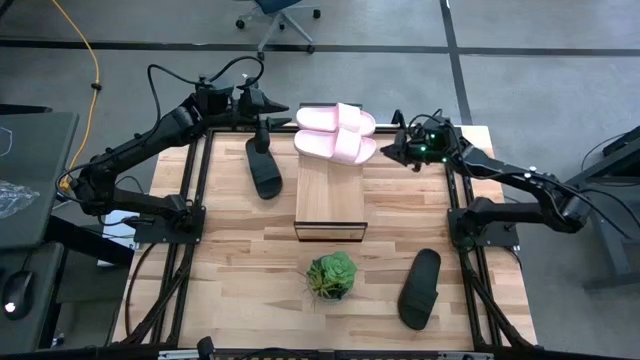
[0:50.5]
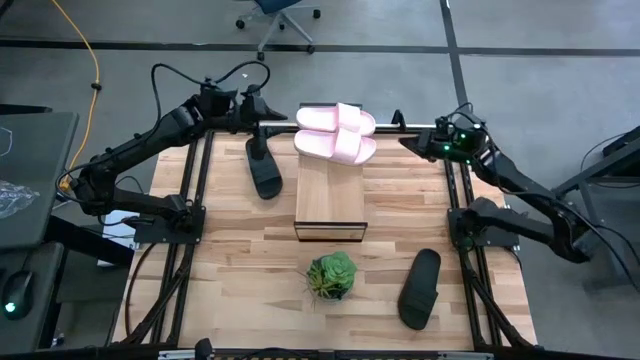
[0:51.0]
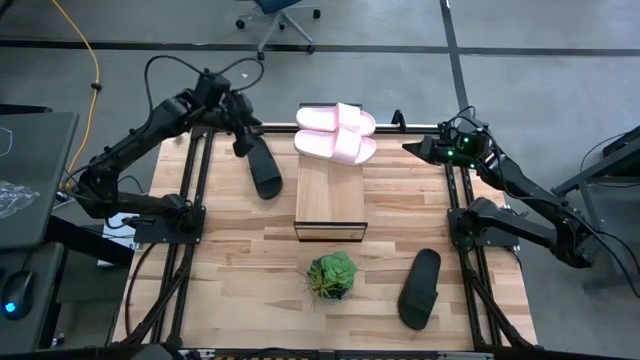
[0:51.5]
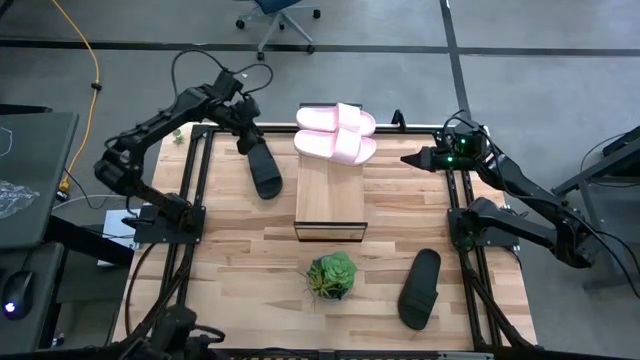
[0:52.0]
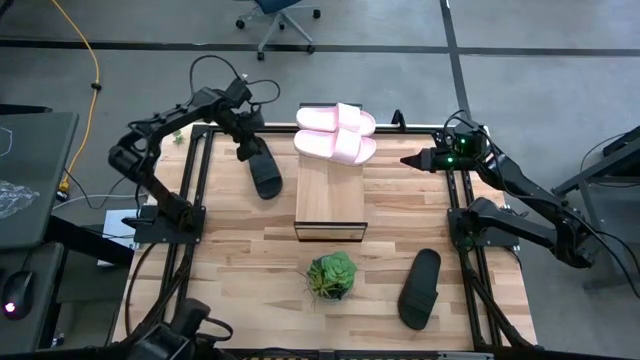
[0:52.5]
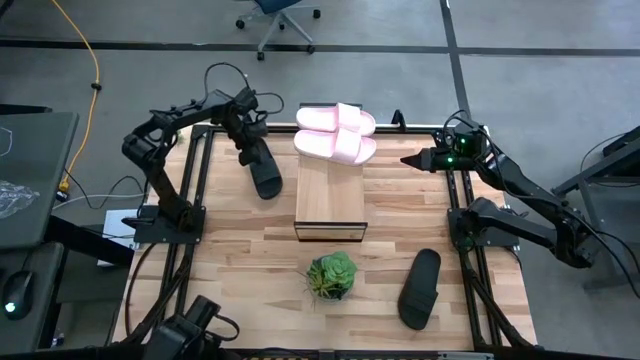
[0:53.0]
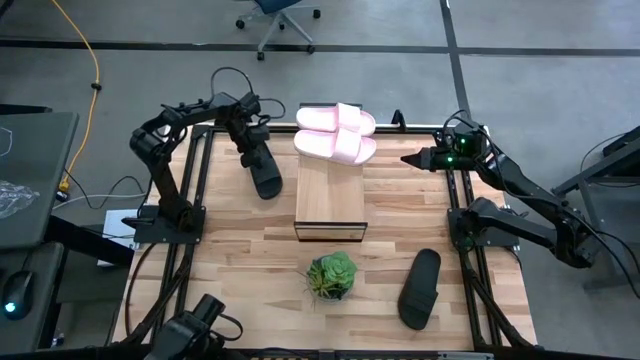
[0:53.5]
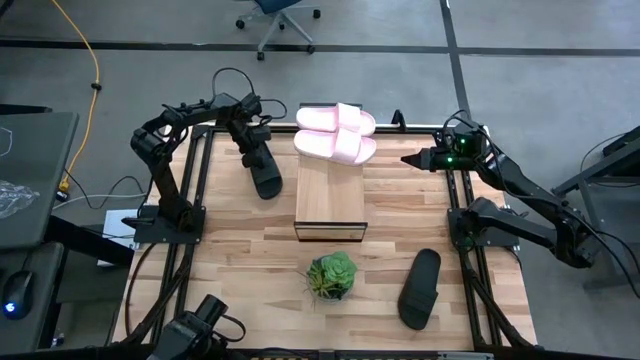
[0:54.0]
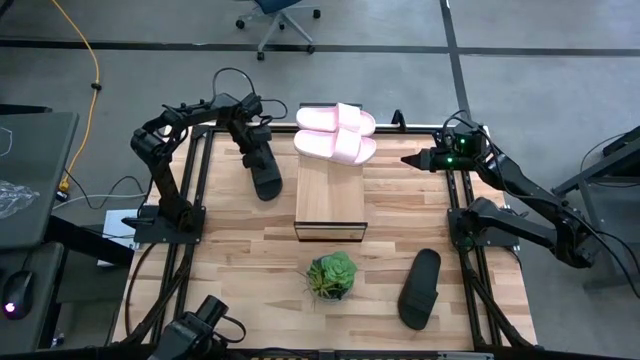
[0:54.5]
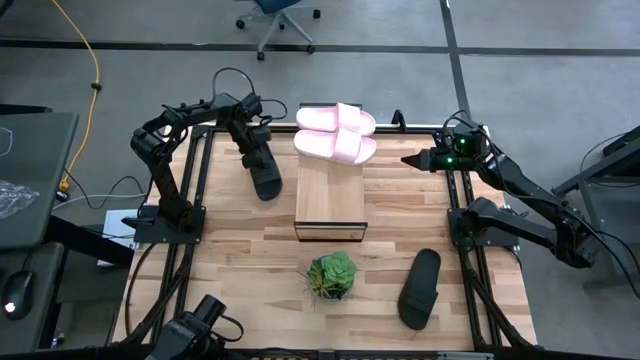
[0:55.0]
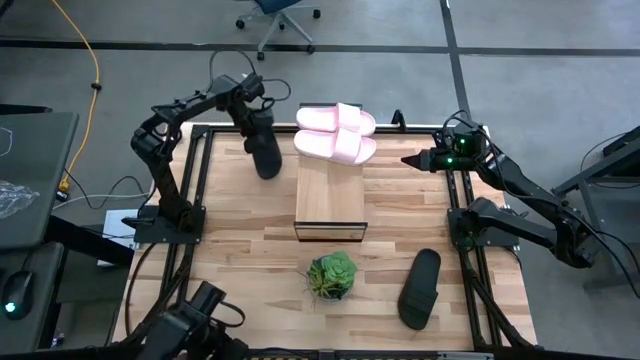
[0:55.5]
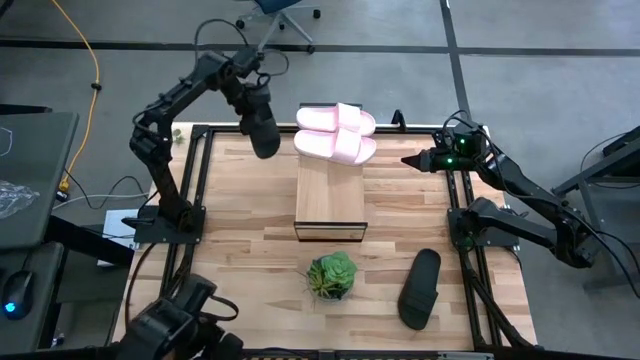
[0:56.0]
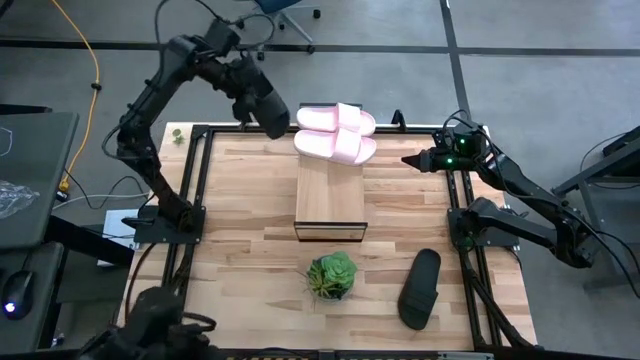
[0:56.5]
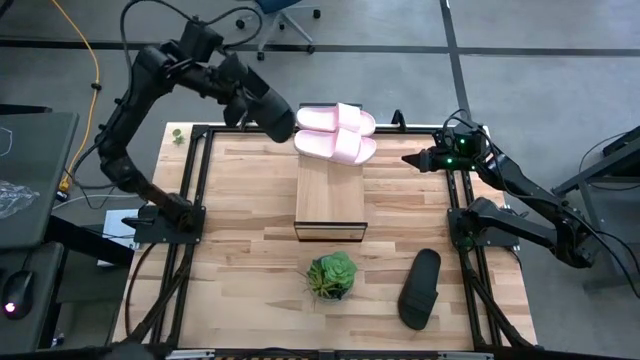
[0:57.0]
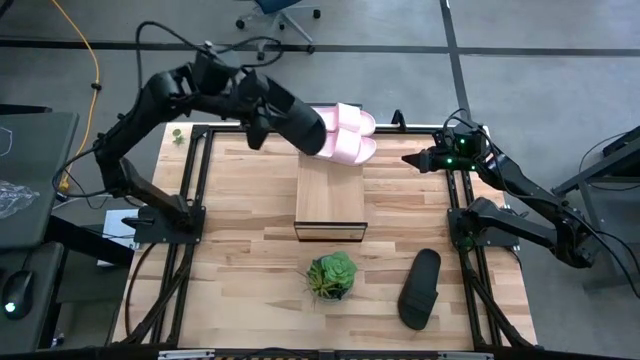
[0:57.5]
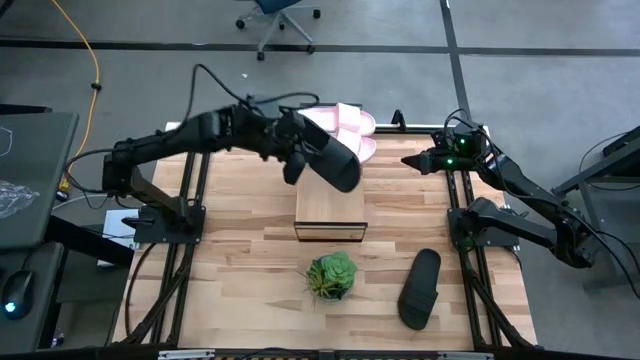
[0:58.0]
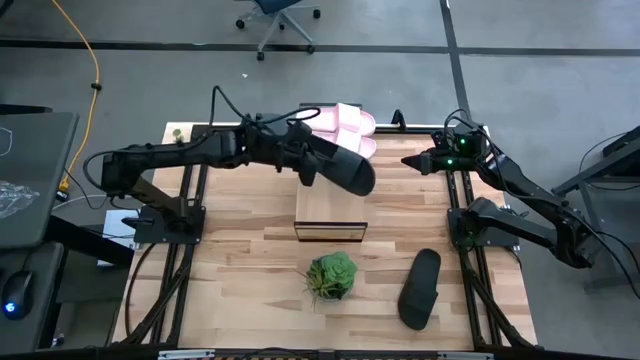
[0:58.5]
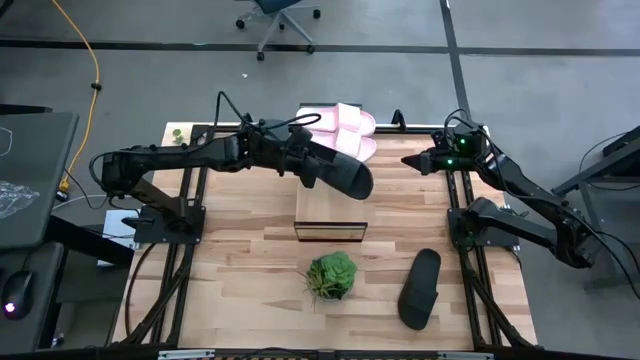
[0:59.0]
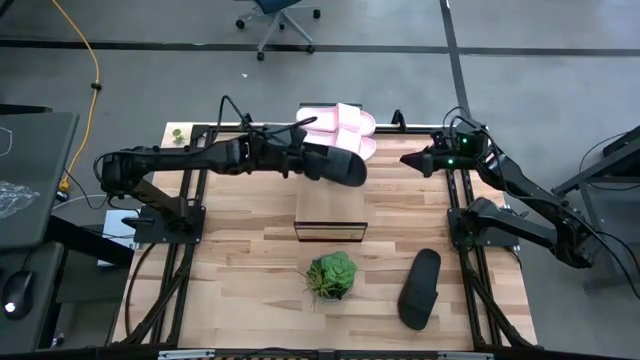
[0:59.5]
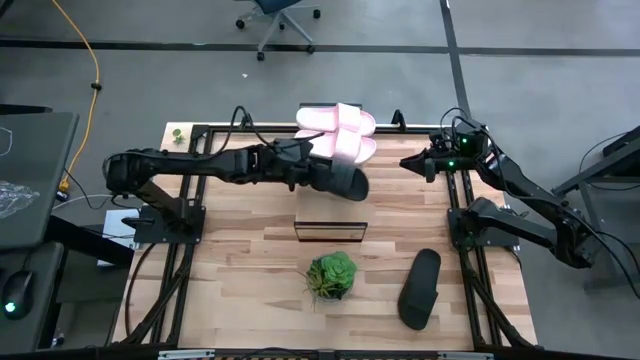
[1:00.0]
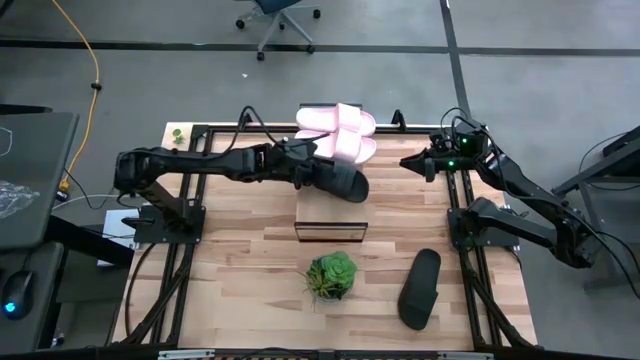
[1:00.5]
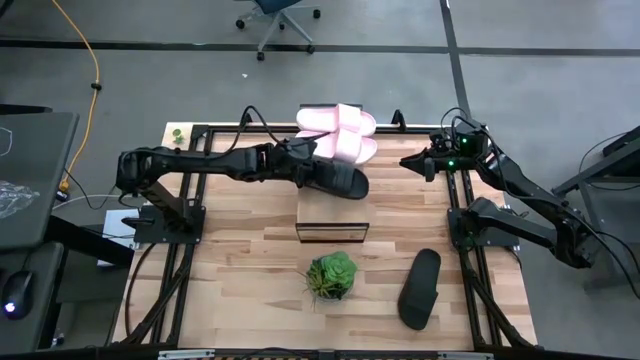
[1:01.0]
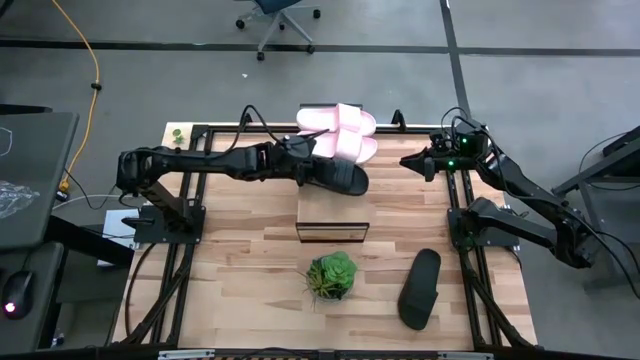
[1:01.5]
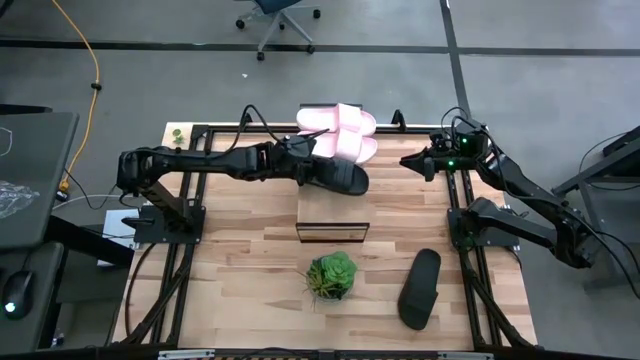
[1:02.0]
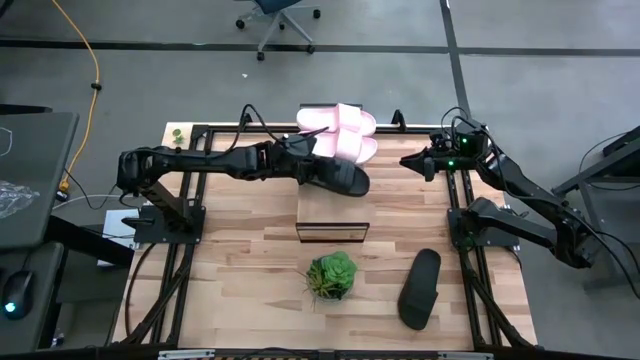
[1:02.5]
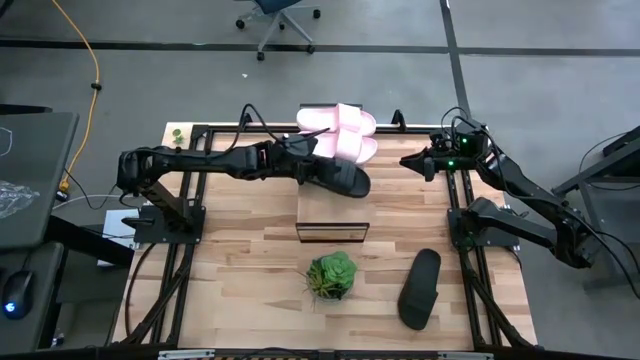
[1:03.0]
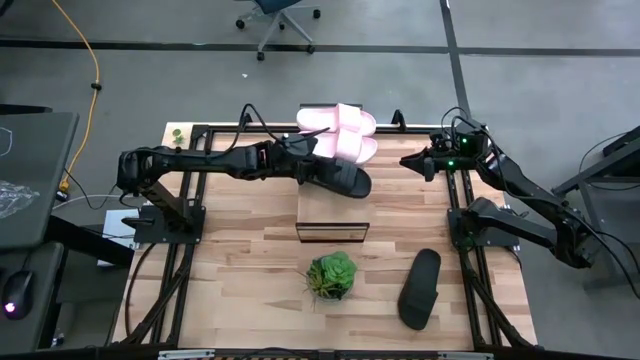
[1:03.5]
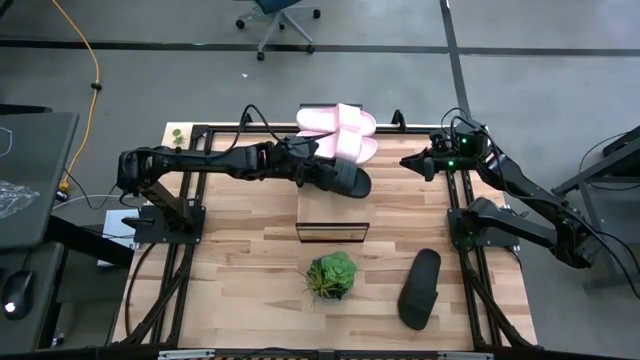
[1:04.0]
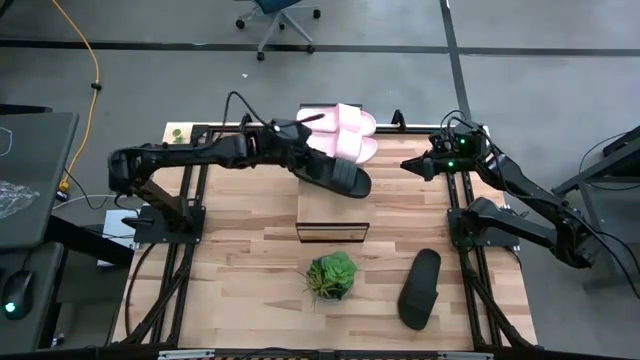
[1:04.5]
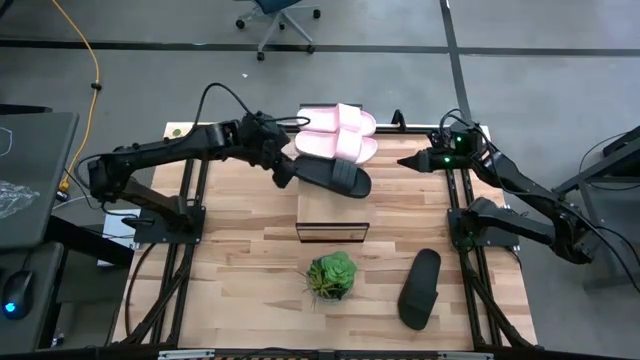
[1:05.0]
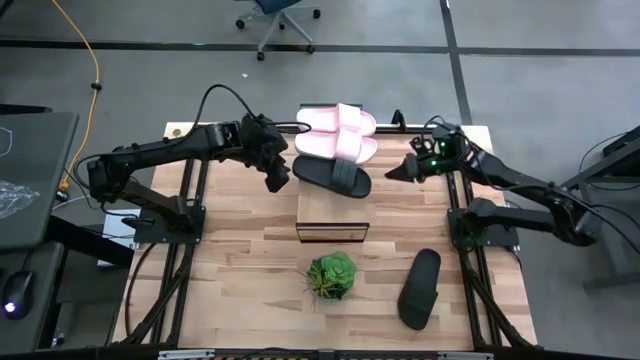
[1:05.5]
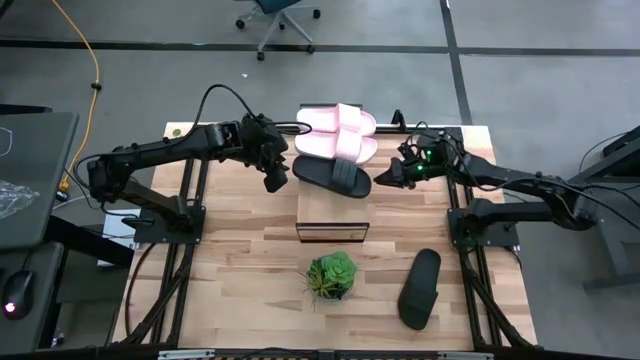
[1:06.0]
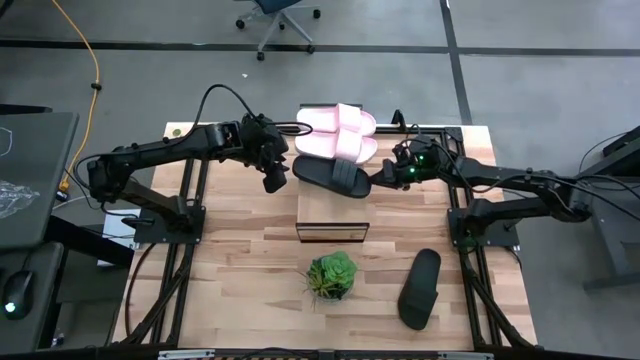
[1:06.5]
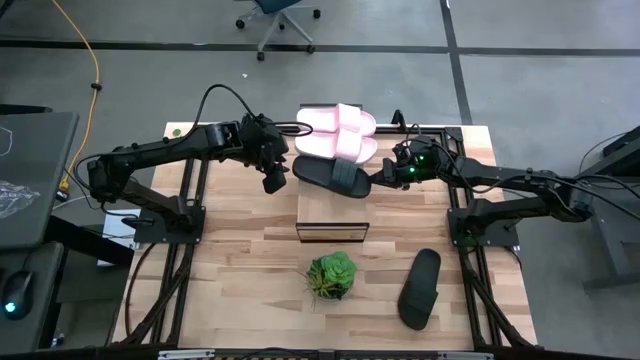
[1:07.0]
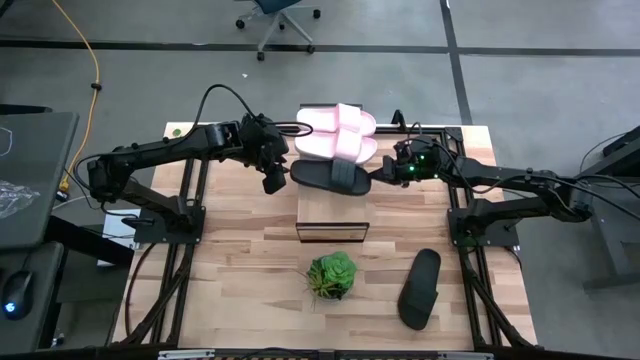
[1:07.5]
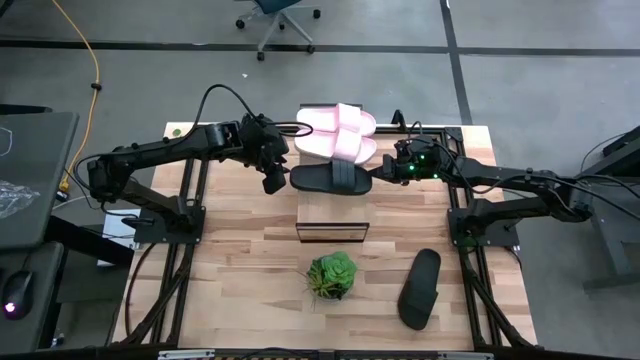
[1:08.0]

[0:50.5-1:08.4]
Task: Pick and place slides into the shelf
Put the top black slide on the shelf
